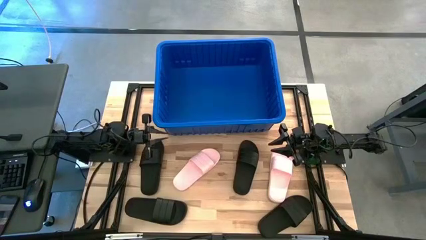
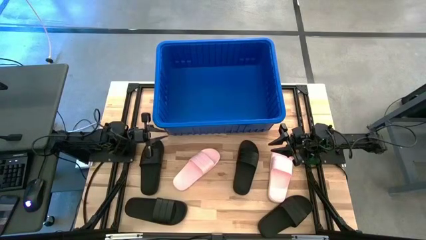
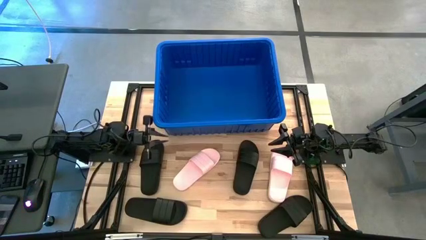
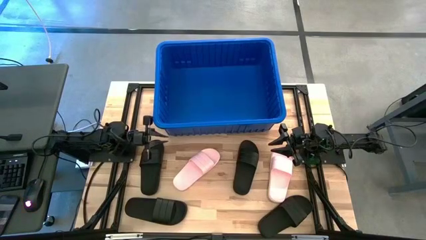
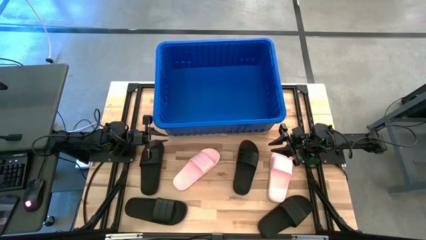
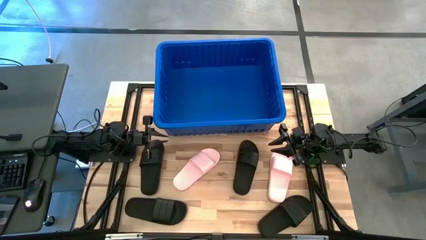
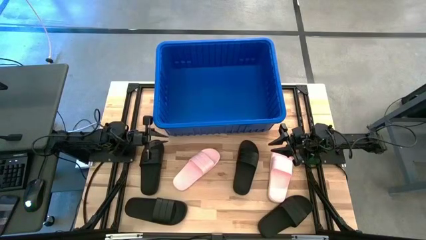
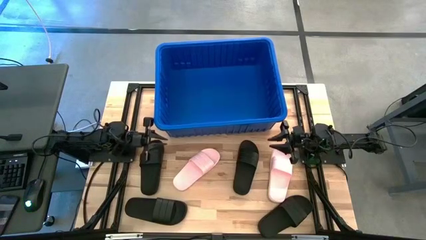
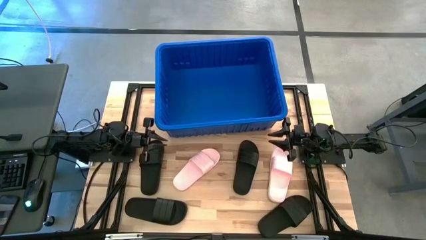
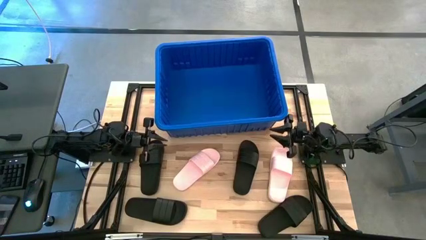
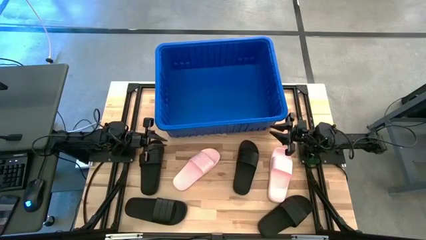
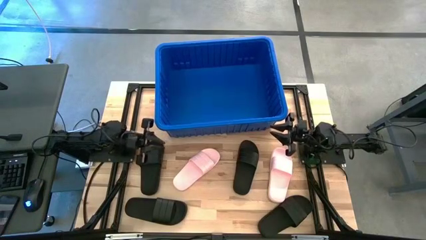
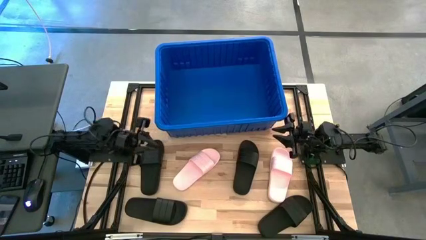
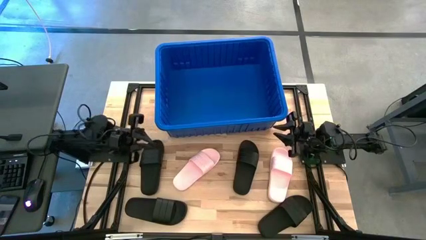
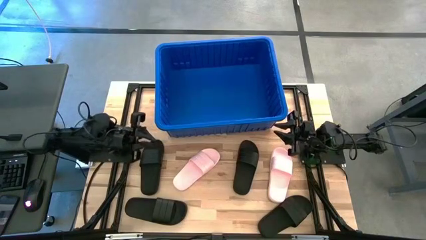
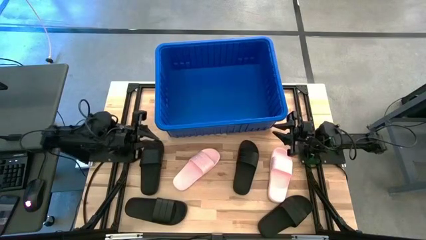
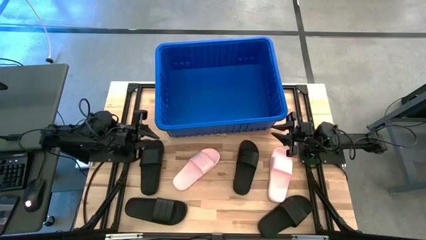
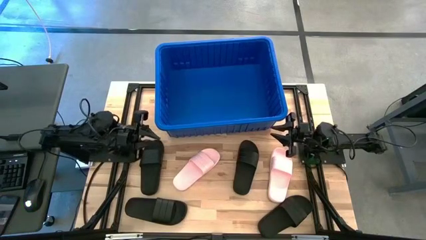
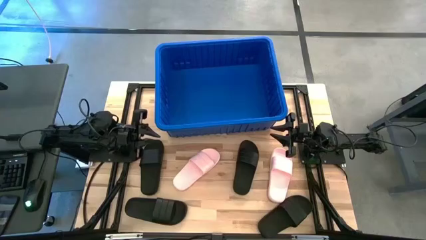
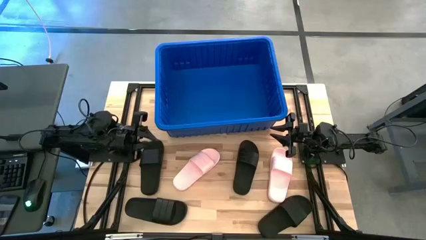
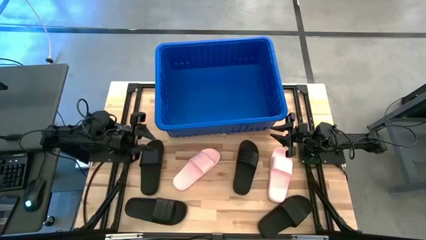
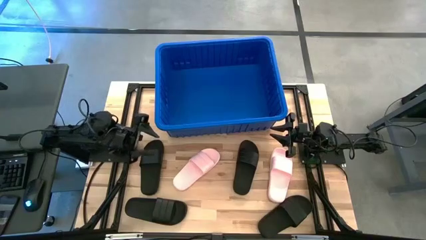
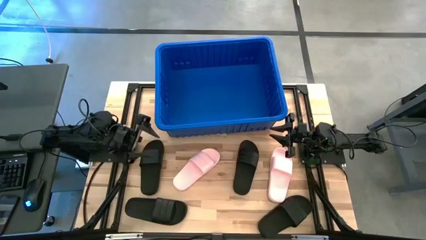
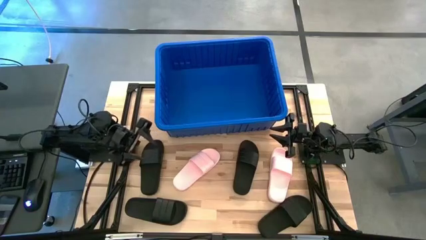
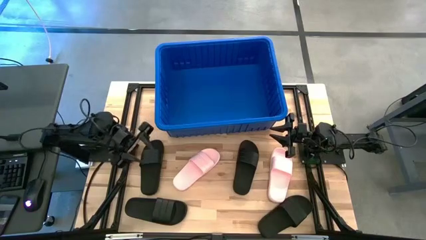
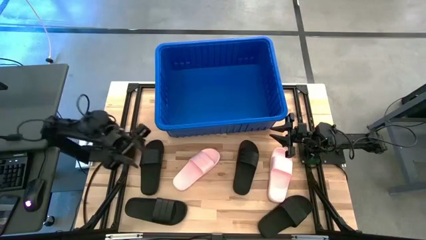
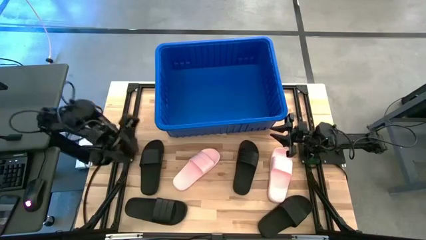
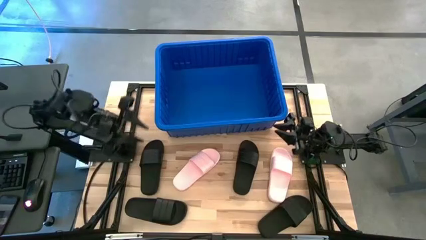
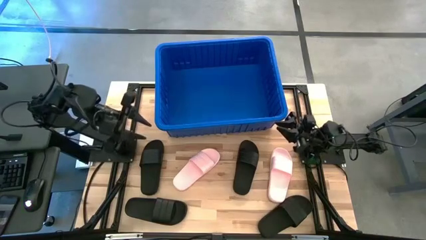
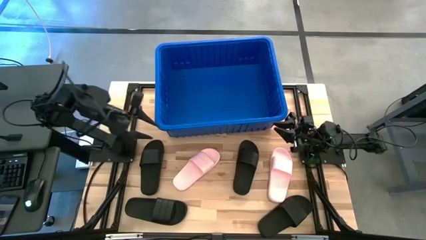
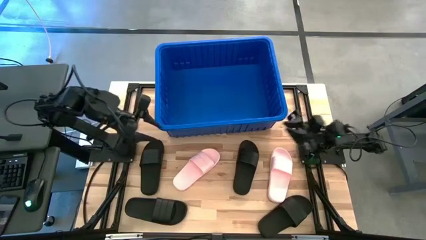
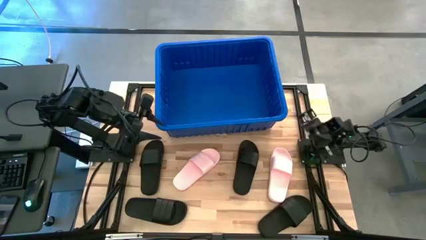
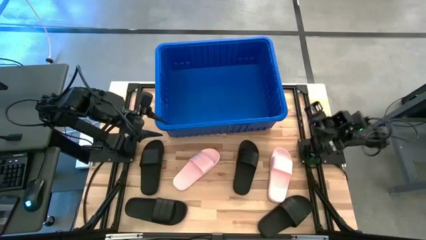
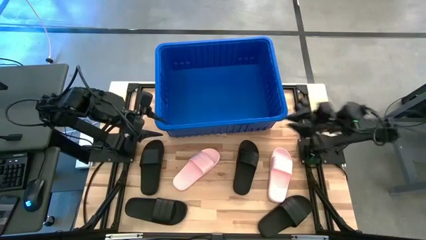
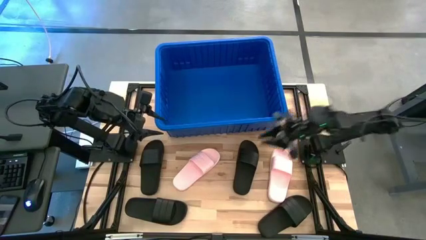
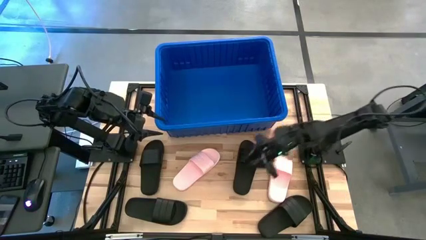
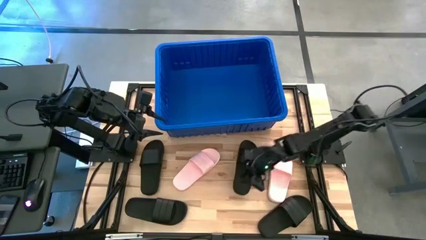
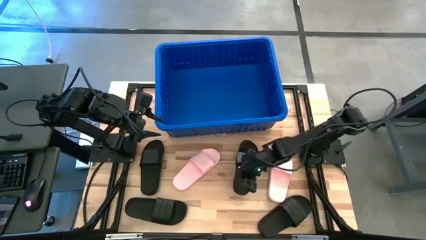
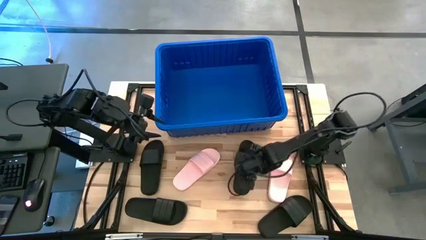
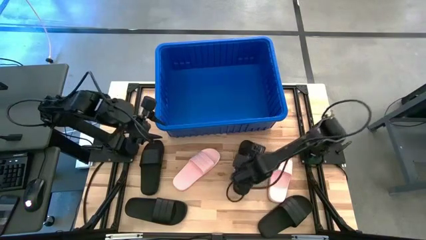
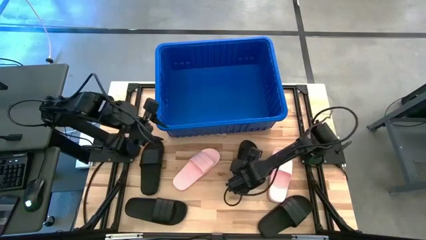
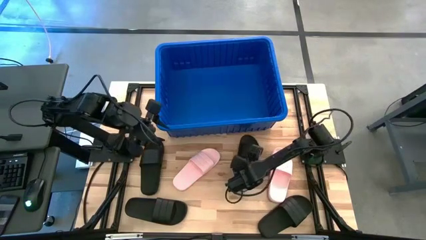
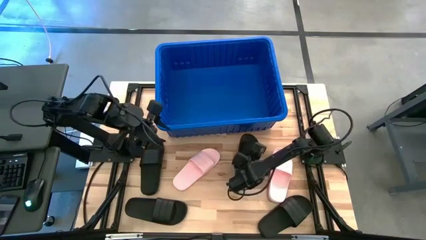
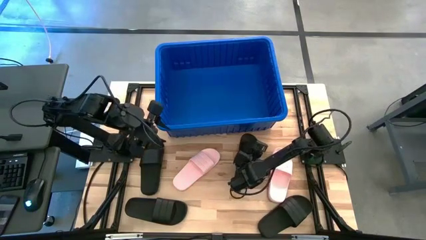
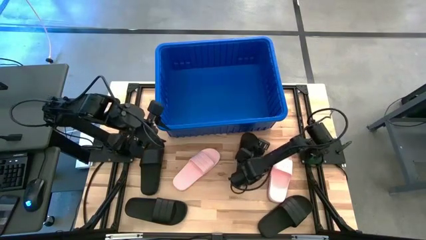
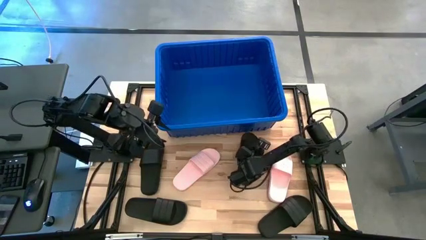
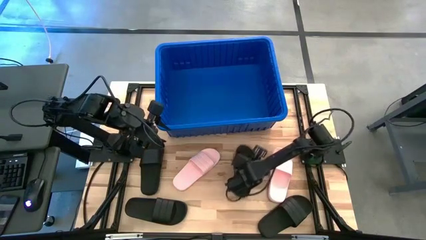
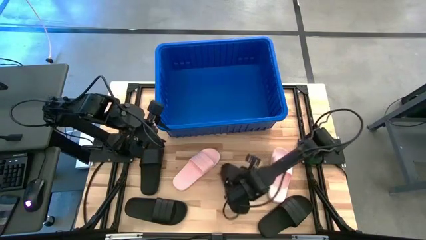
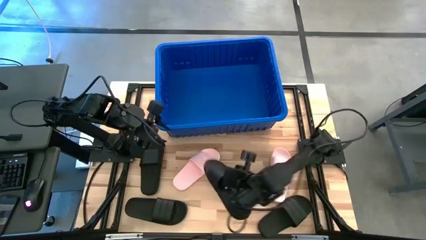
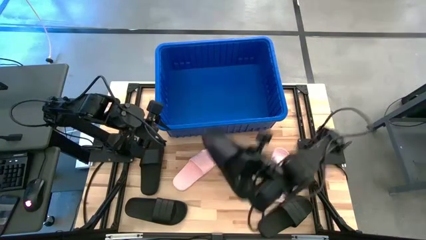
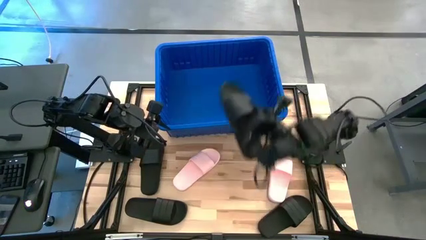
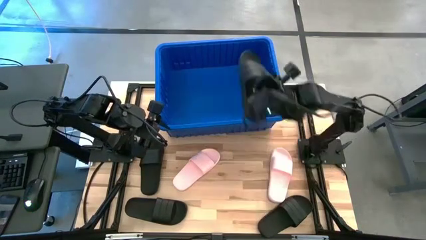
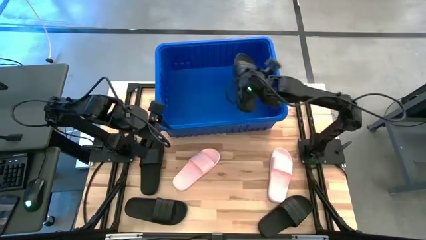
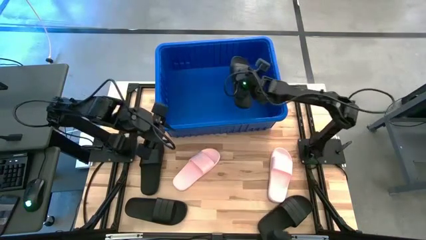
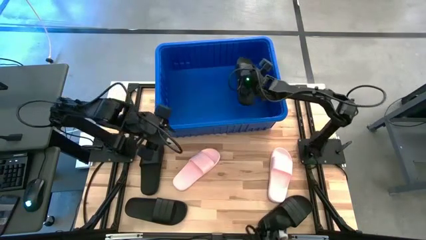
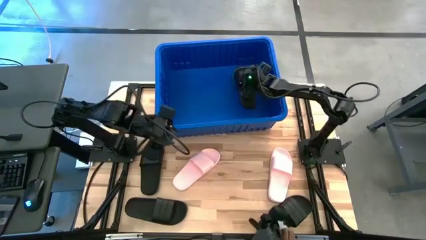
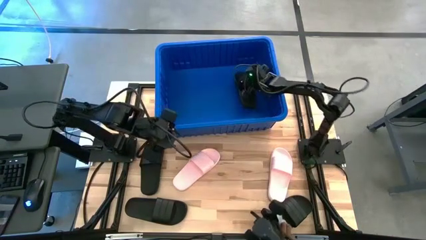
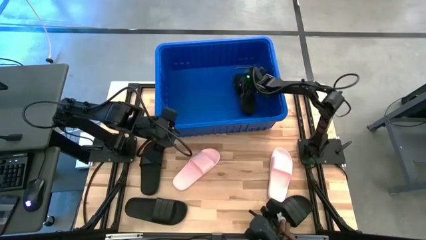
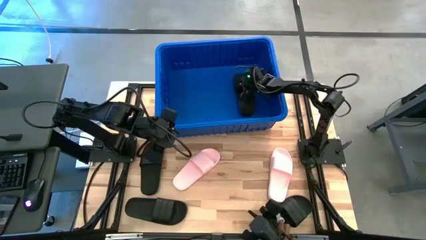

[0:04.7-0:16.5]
Task: Pick and place slides into bin
Put the black slide into the blue bin

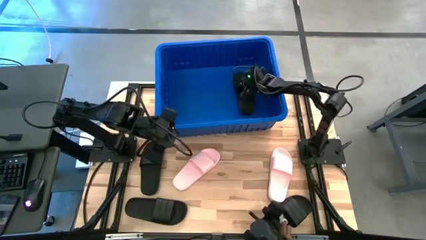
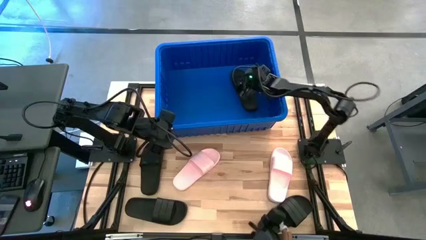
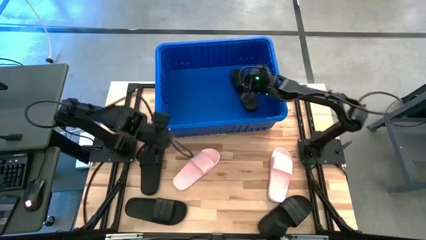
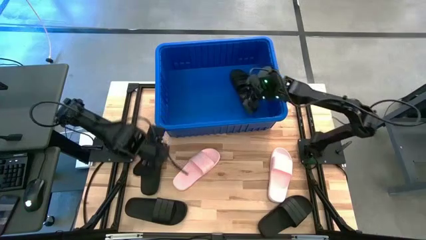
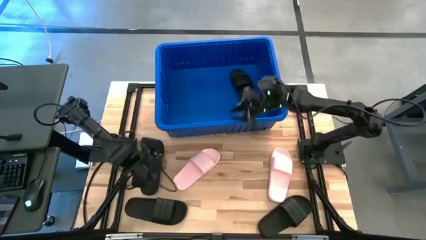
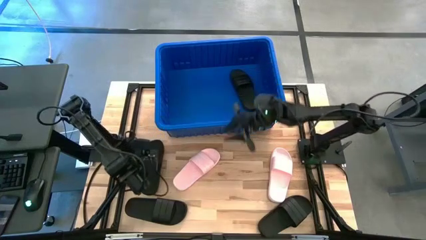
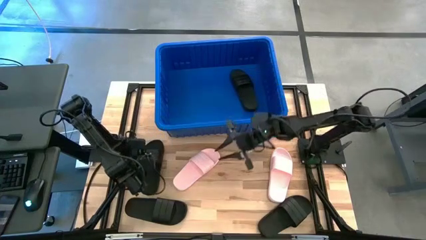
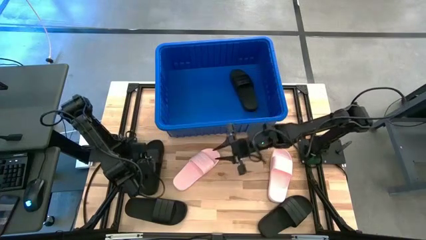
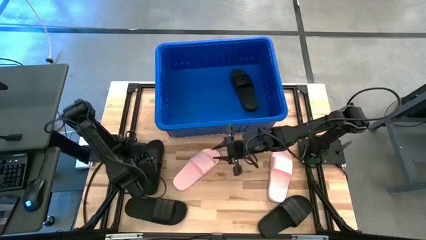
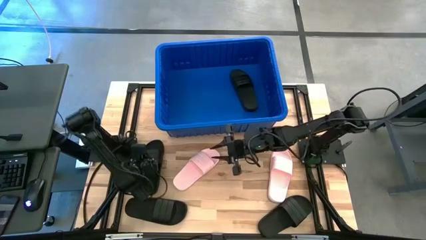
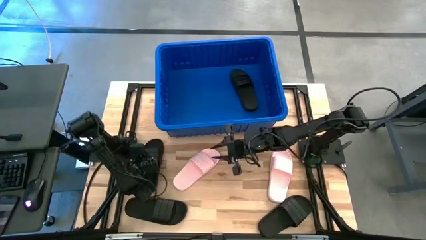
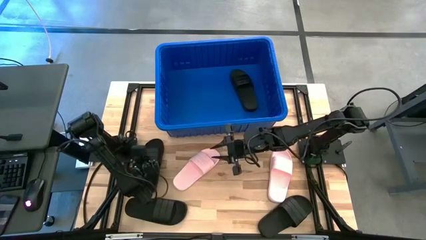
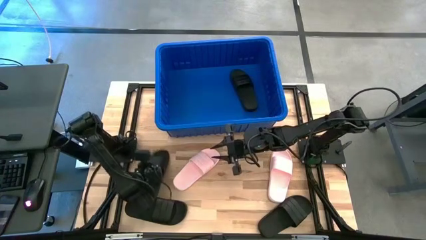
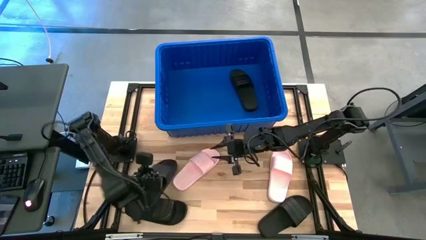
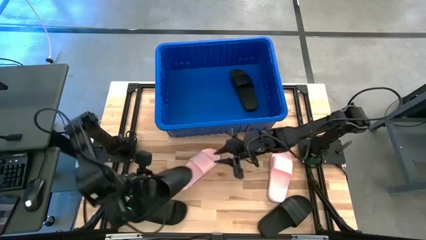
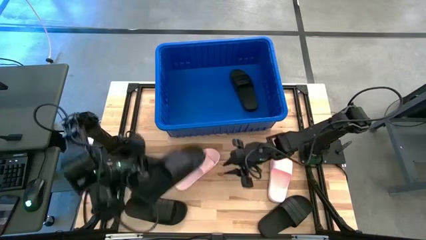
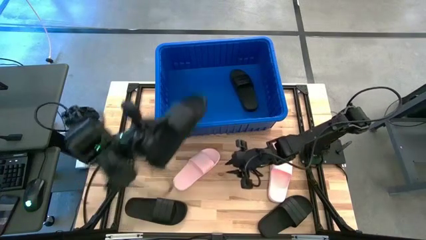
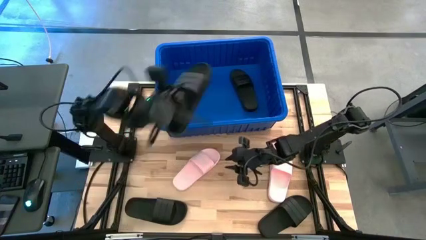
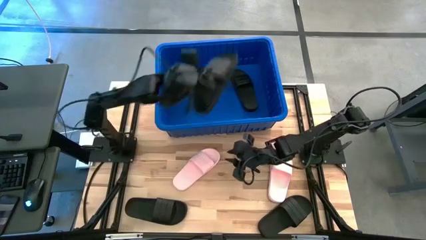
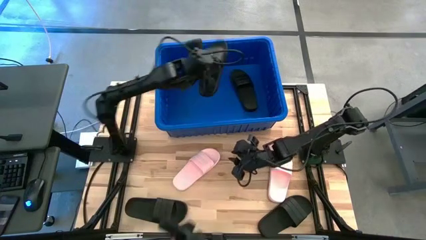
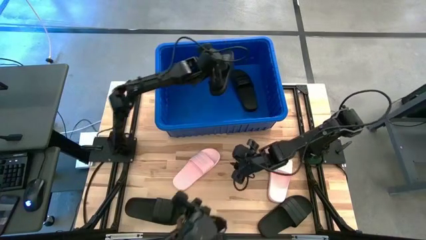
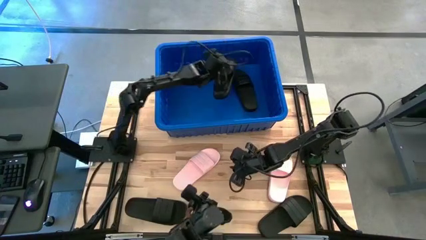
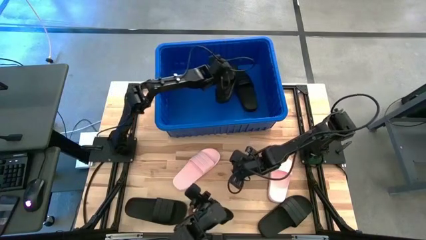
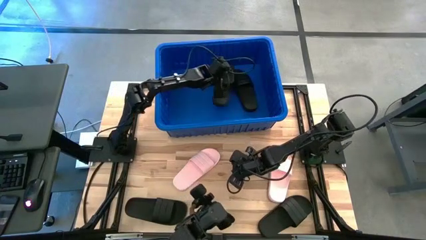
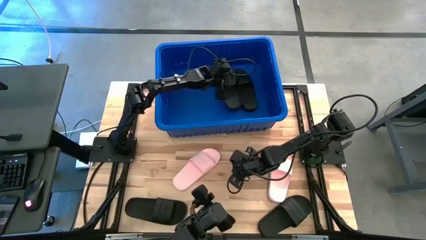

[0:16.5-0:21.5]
Put the black slides into the blue bin
